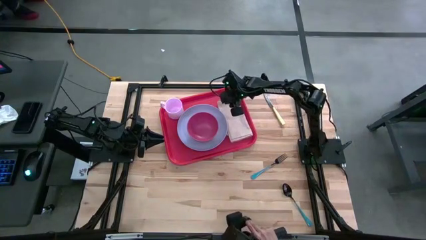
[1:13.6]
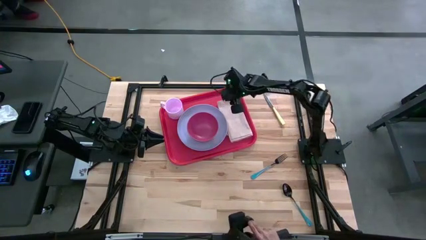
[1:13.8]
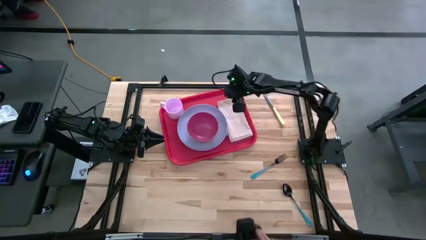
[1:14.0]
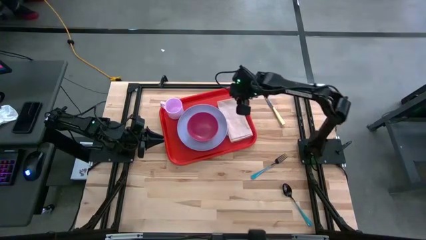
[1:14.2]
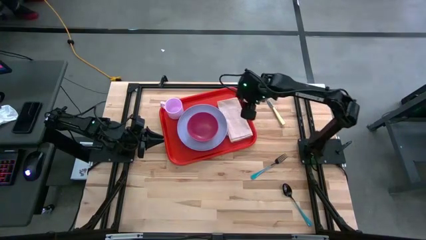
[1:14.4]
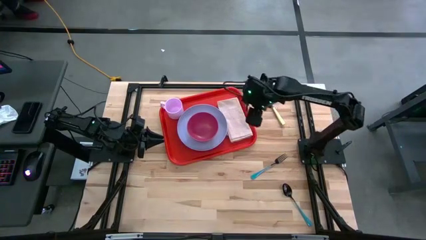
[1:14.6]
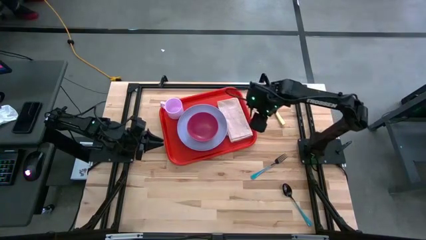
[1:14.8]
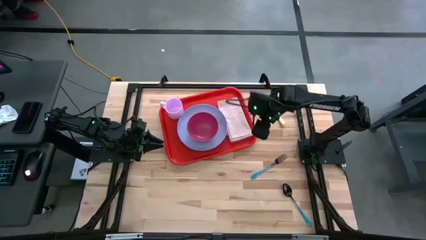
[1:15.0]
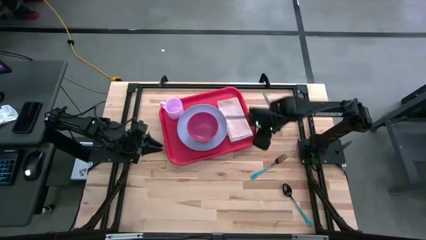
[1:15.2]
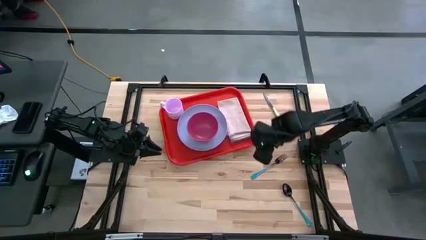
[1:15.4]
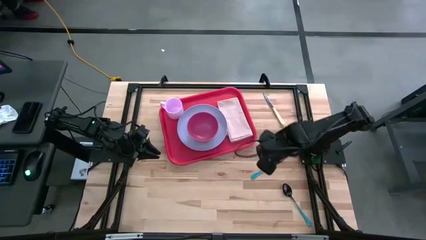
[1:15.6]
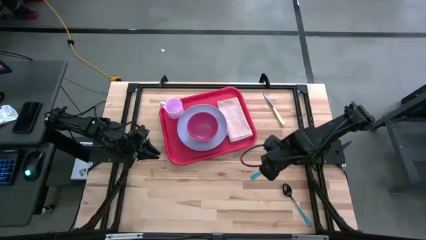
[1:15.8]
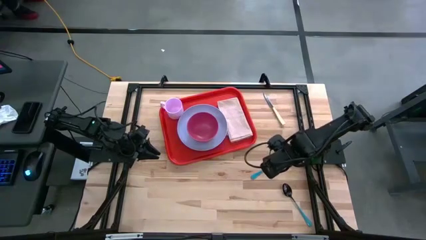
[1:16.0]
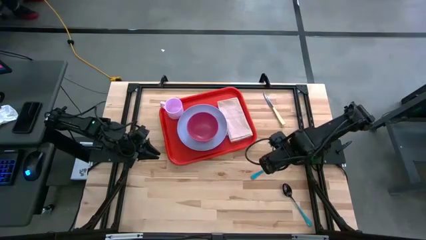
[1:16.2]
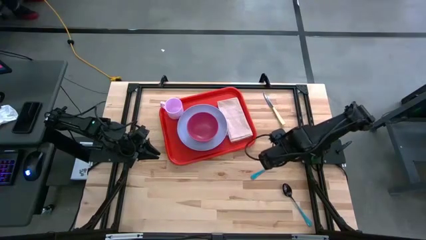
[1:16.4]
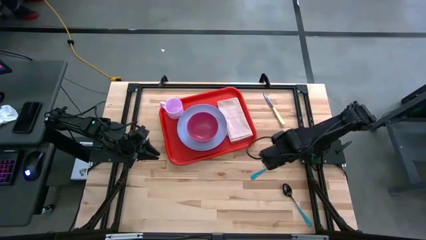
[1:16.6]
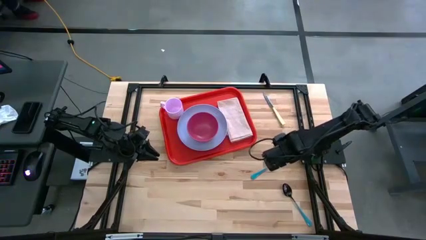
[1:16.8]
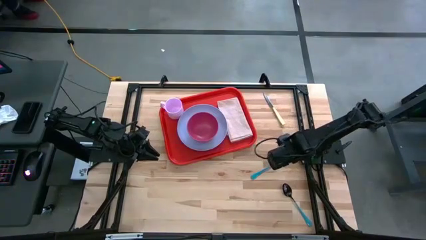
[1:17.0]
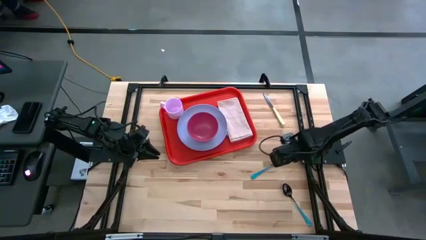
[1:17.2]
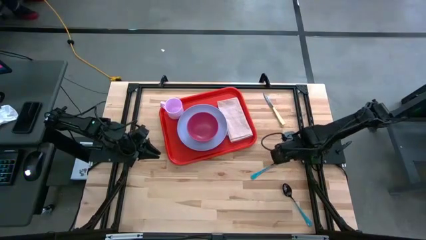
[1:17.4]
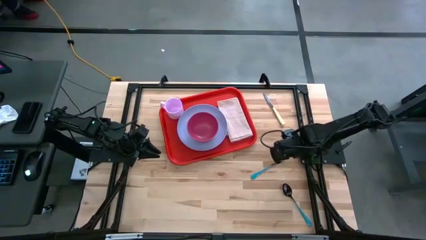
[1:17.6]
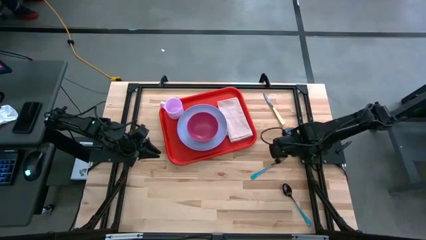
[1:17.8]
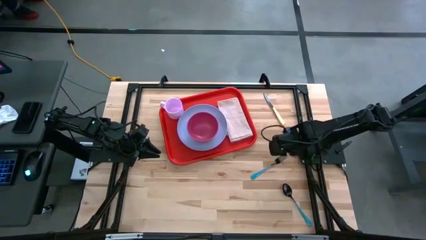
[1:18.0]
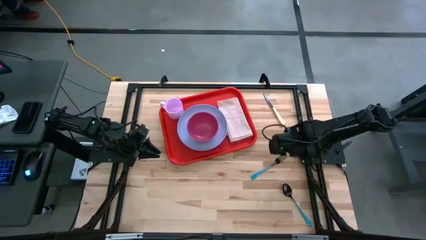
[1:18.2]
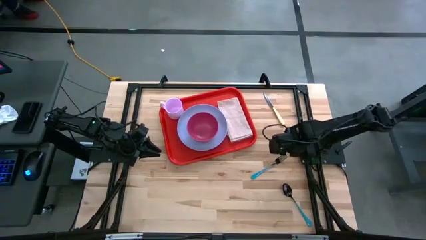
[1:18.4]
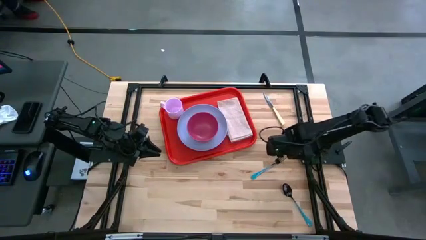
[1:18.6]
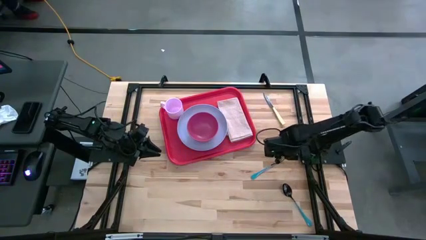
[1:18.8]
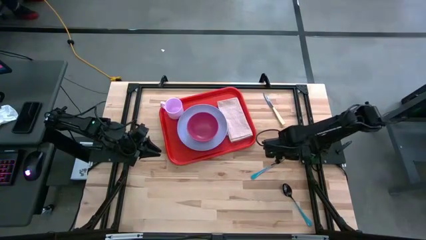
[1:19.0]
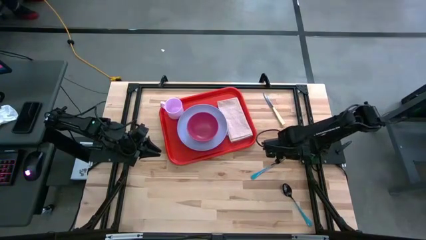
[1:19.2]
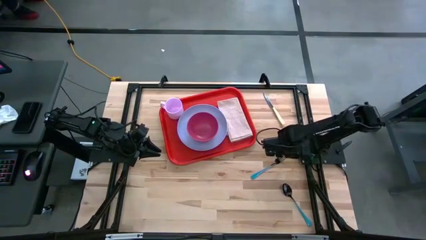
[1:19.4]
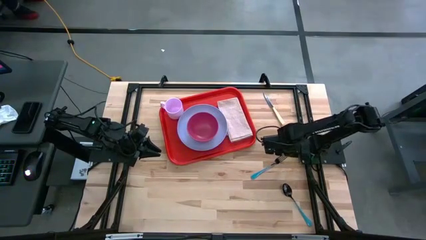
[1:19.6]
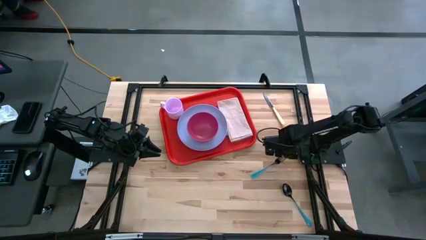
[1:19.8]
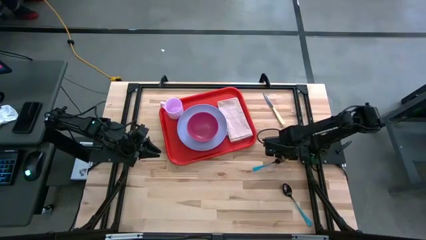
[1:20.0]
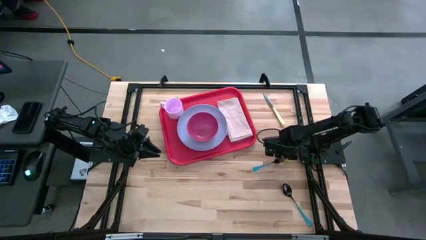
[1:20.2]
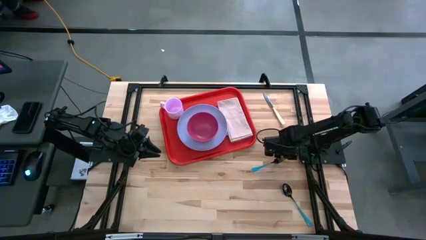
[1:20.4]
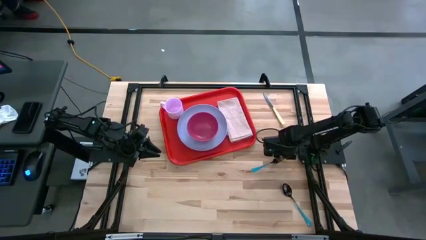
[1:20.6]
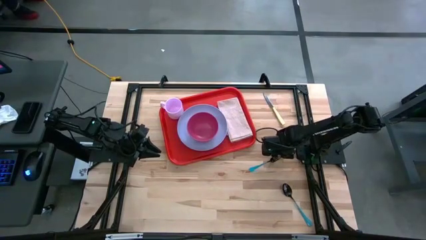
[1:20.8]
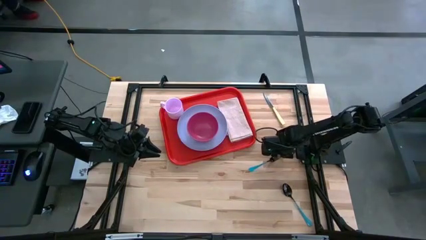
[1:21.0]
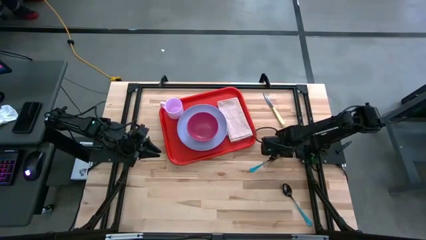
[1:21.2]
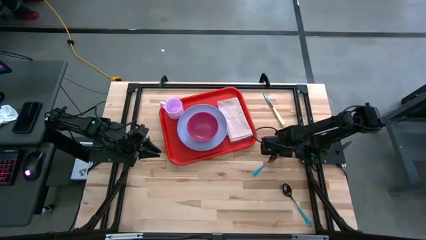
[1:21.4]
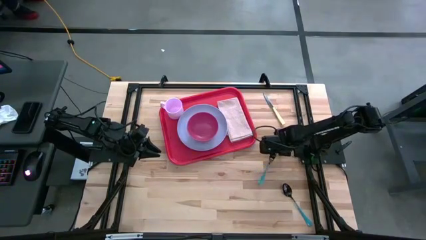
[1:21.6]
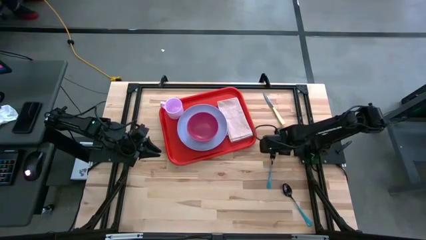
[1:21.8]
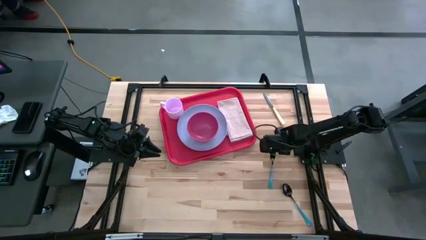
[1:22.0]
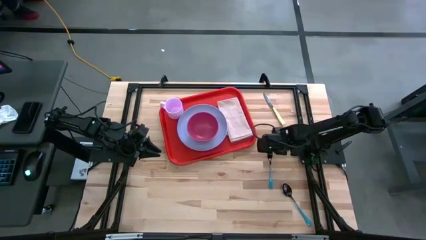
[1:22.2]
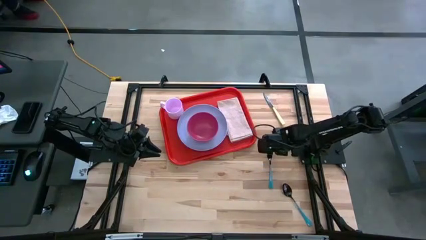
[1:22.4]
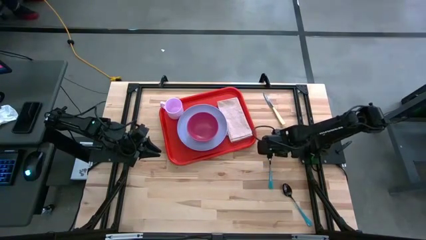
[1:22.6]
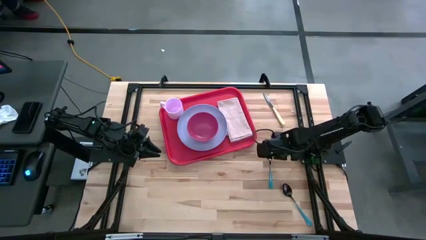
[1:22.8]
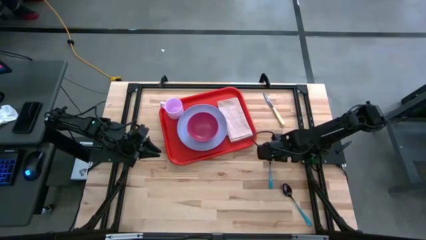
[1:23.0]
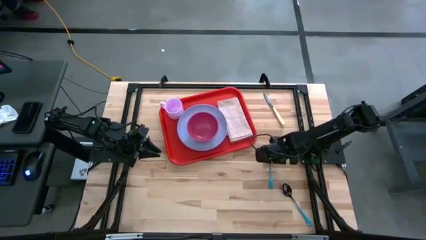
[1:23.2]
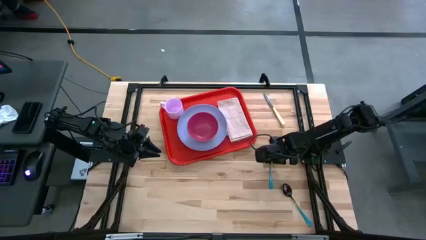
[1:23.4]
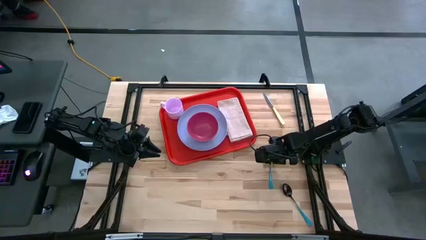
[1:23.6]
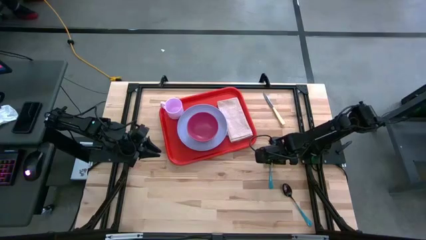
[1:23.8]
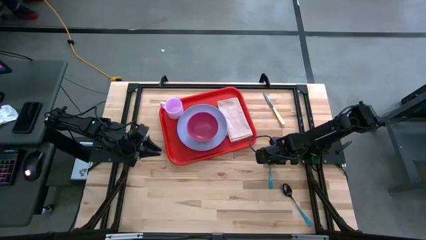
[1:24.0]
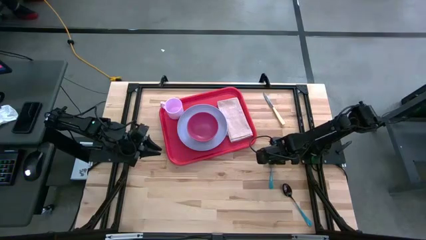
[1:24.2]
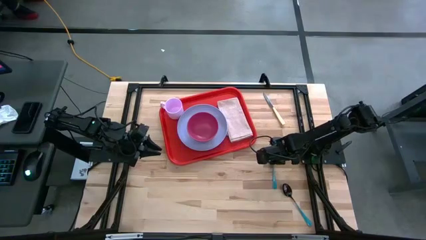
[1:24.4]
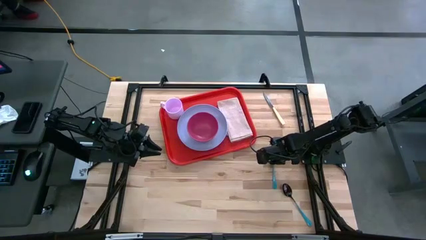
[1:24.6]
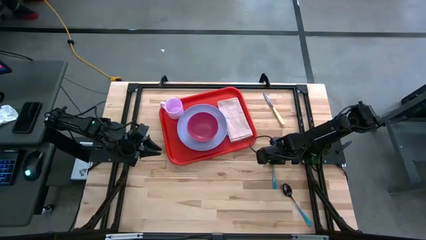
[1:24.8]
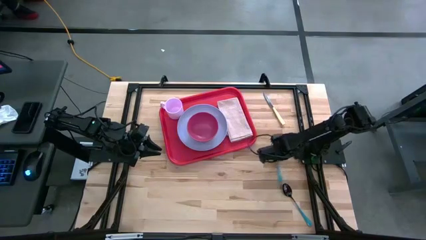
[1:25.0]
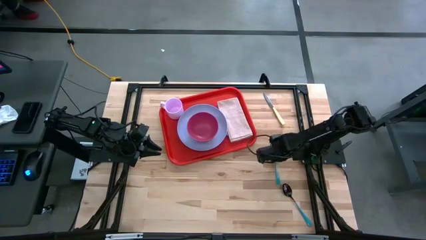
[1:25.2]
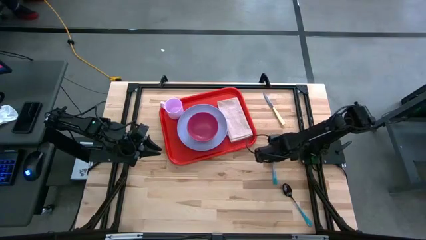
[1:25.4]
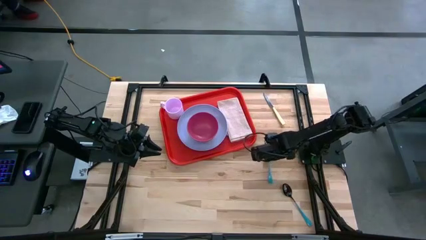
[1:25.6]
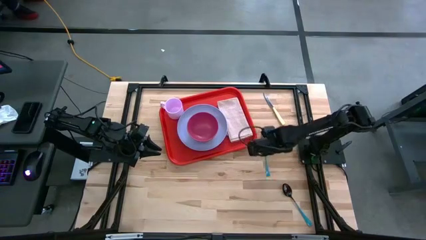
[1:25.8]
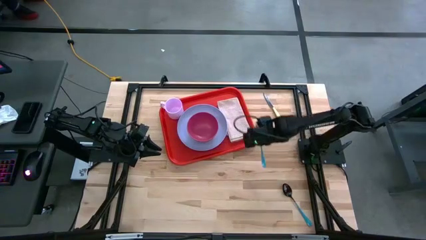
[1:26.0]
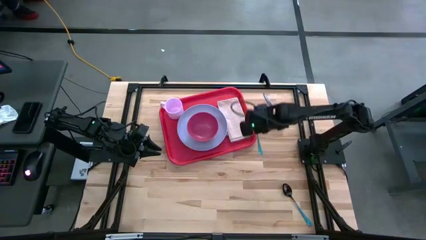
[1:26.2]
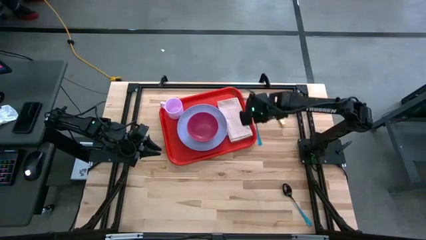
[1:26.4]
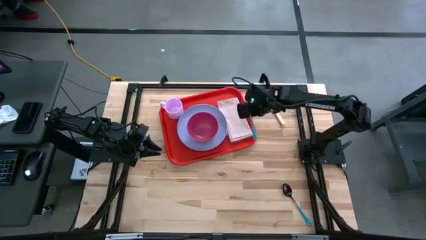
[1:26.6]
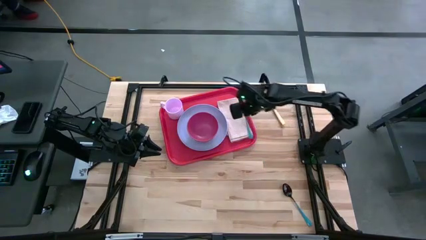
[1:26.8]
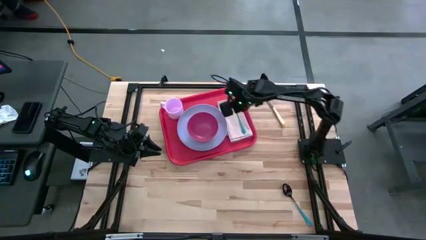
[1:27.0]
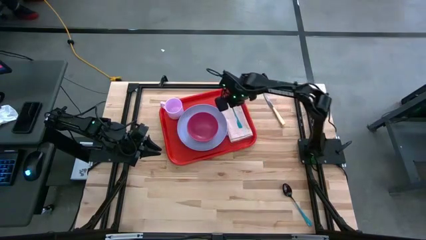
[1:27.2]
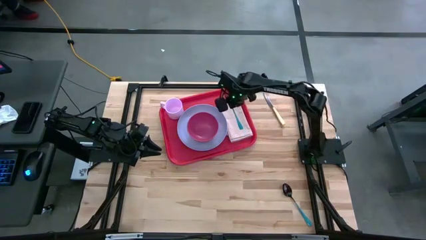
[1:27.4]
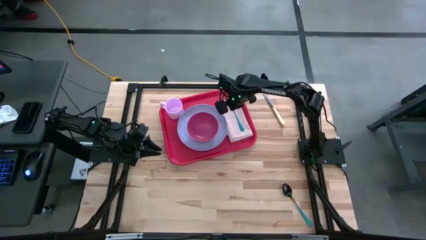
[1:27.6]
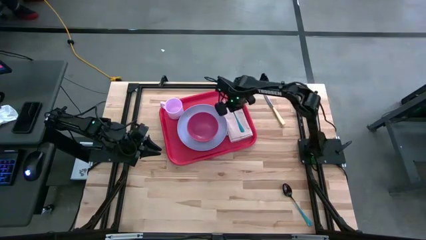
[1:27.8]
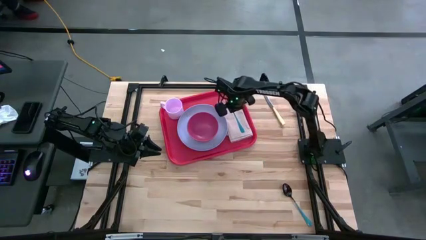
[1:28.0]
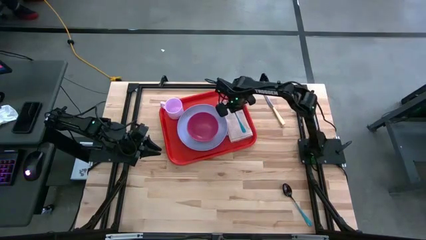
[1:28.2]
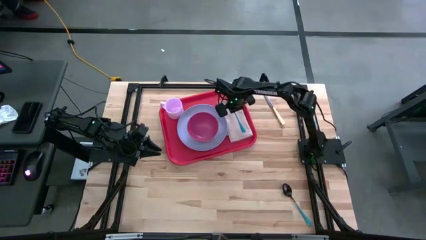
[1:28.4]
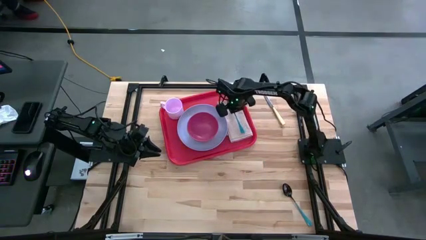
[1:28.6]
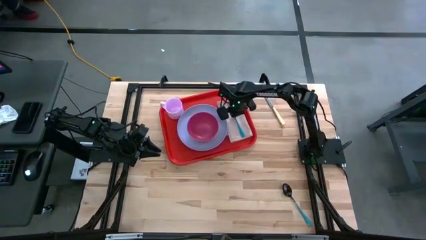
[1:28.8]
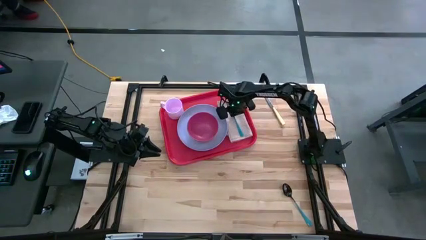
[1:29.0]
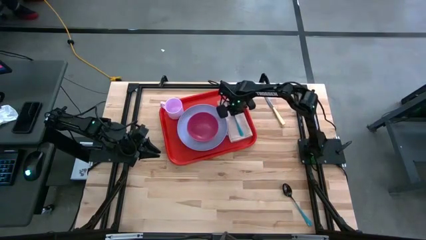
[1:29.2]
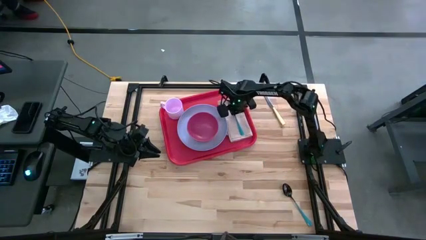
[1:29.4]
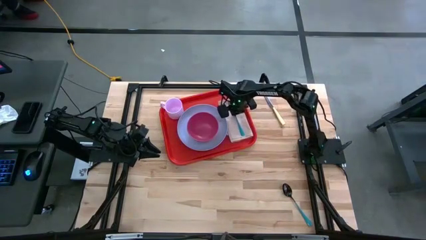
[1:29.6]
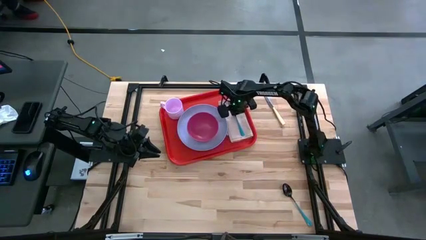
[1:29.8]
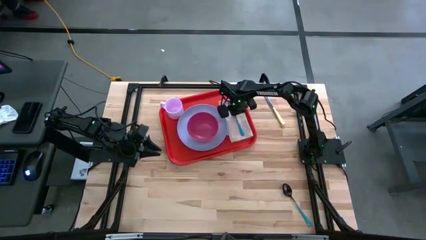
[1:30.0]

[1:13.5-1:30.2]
Task: Set up tray
Put the blue fork on the brown napkin

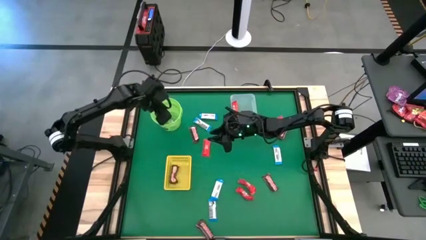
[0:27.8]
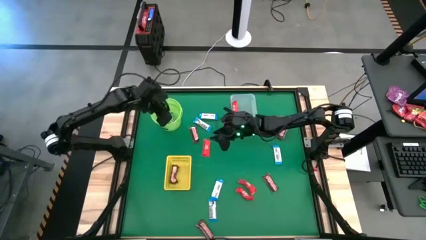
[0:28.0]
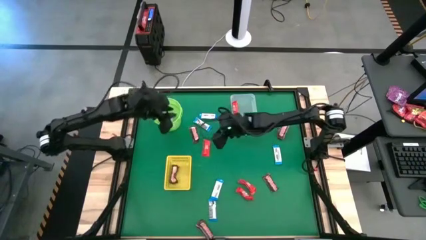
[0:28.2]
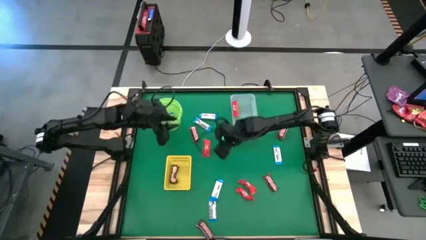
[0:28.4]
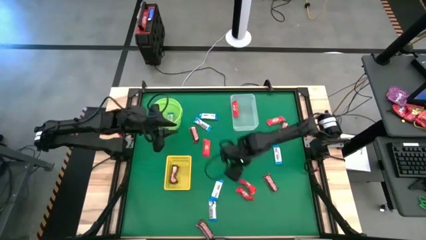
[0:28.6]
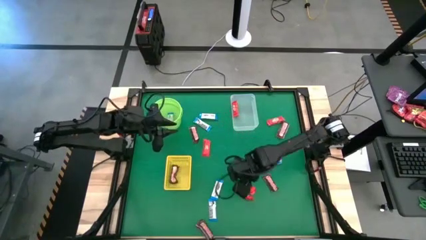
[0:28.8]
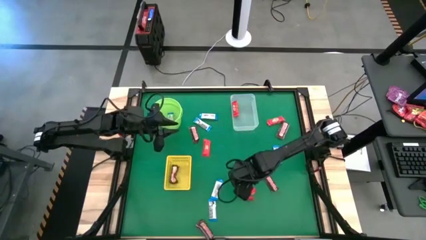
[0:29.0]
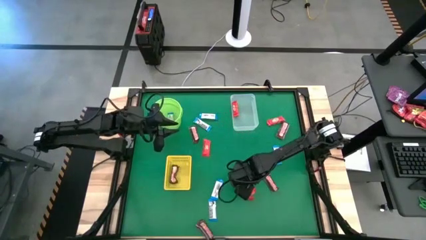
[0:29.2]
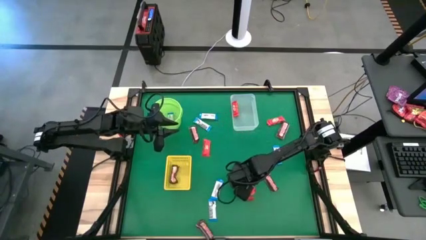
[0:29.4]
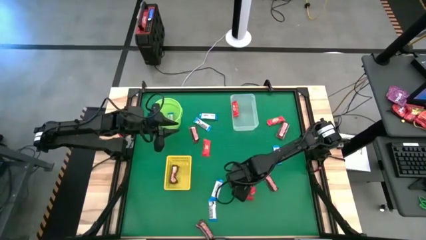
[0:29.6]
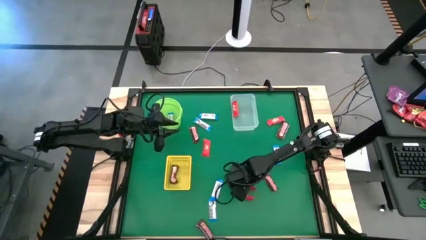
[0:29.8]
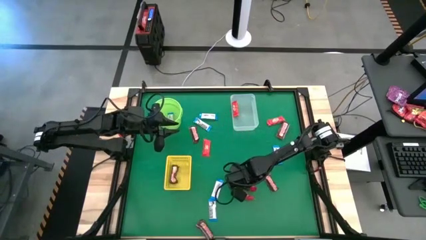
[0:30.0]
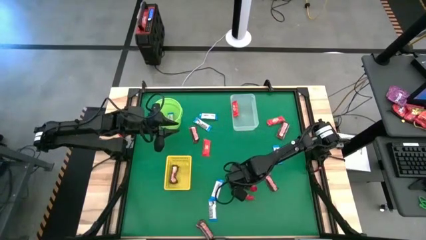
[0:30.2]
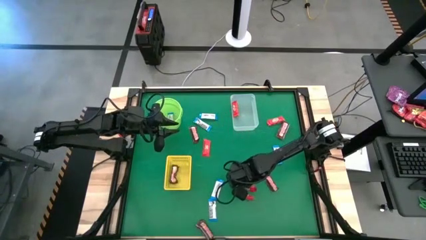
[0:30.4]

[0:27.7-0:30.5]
Task: Sort candy by brand, put in halloween buckets
Put the red chocolate into the transparent bin
